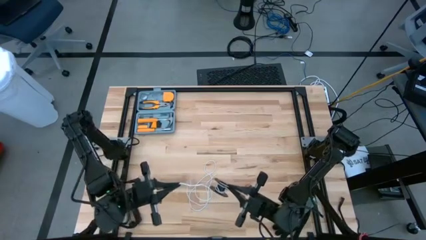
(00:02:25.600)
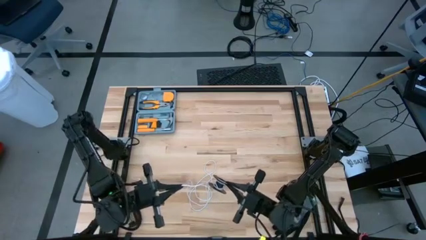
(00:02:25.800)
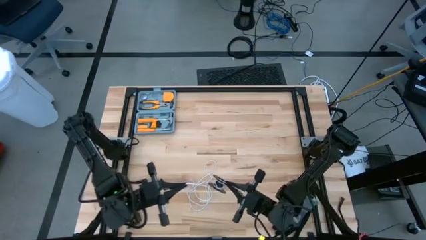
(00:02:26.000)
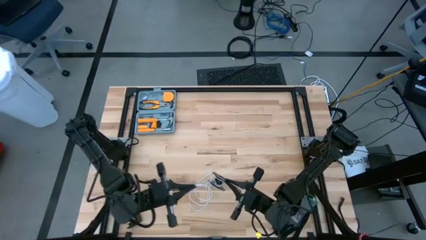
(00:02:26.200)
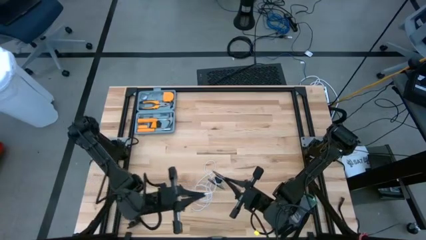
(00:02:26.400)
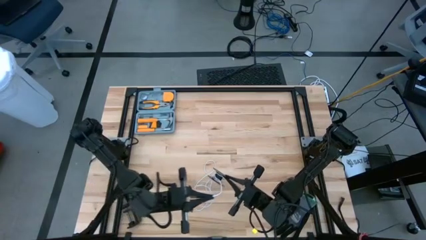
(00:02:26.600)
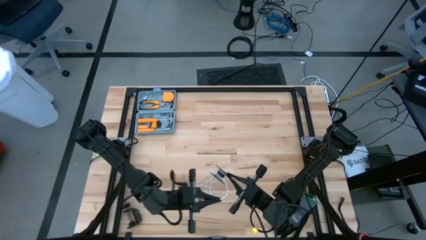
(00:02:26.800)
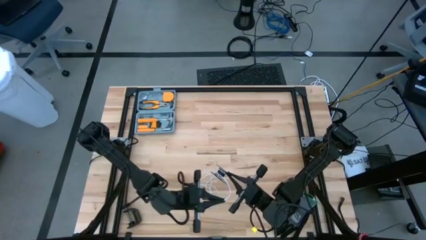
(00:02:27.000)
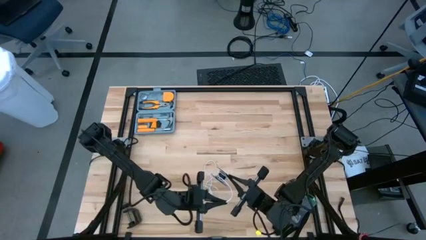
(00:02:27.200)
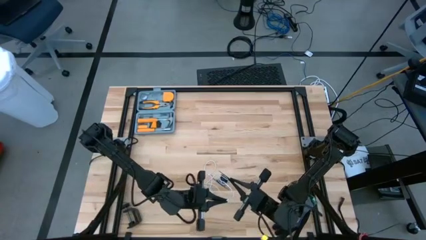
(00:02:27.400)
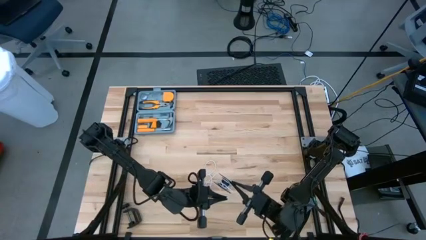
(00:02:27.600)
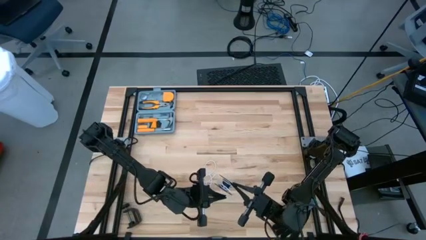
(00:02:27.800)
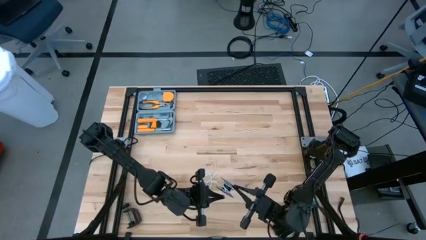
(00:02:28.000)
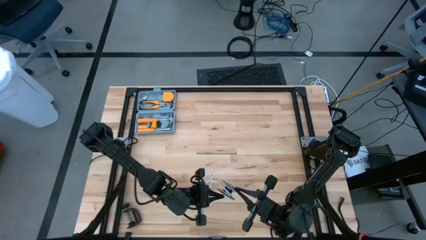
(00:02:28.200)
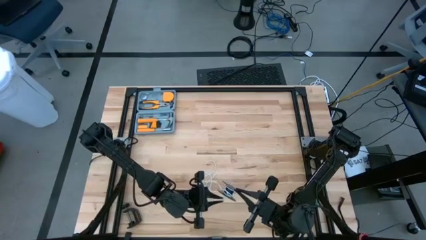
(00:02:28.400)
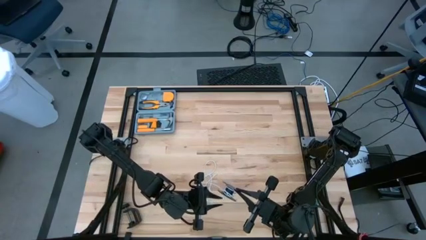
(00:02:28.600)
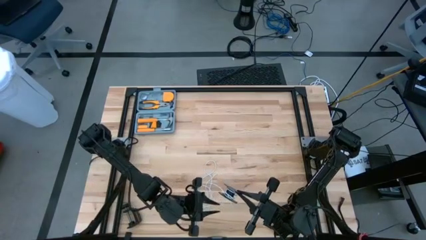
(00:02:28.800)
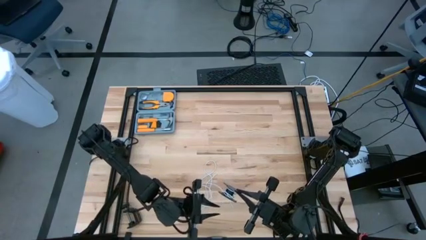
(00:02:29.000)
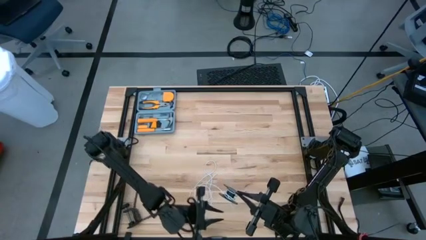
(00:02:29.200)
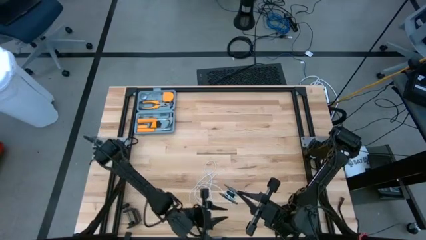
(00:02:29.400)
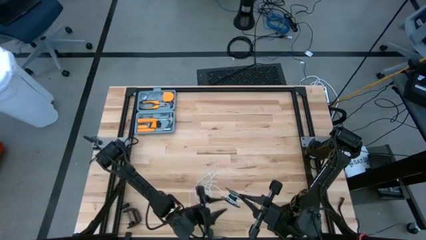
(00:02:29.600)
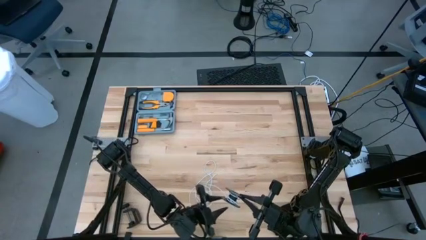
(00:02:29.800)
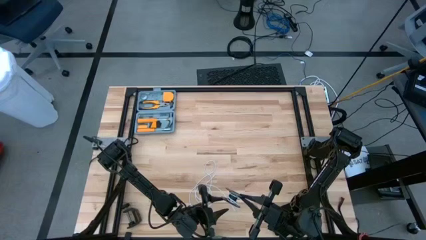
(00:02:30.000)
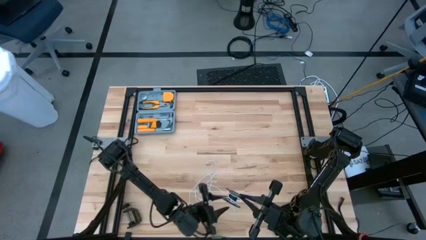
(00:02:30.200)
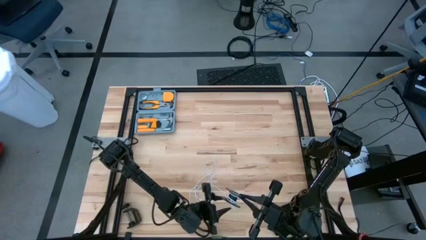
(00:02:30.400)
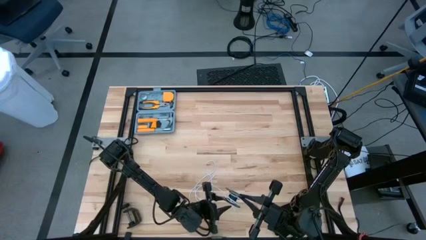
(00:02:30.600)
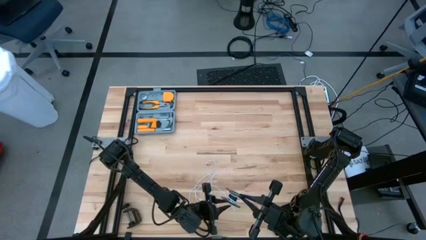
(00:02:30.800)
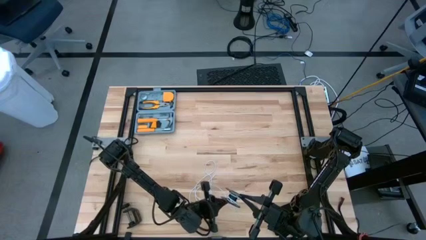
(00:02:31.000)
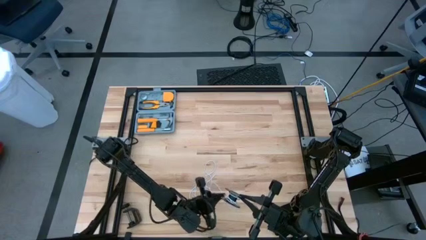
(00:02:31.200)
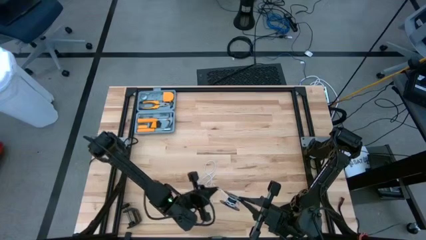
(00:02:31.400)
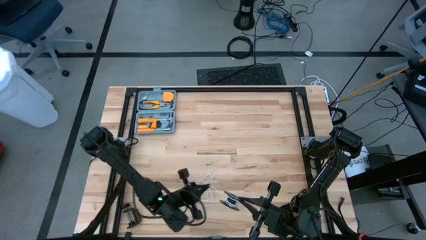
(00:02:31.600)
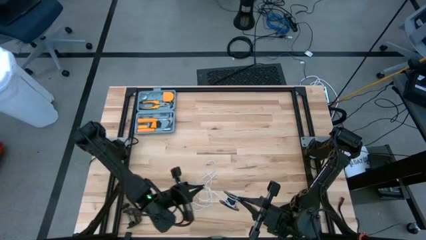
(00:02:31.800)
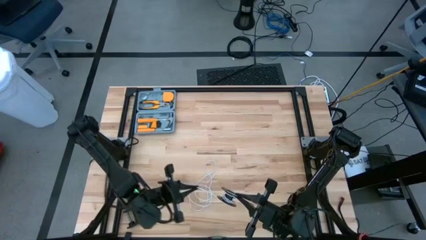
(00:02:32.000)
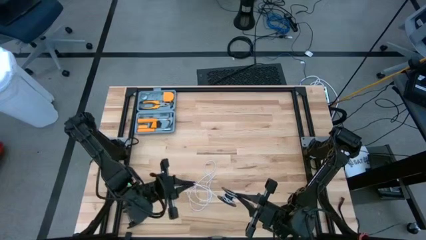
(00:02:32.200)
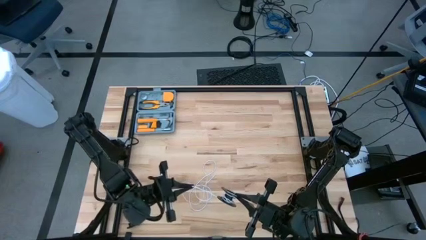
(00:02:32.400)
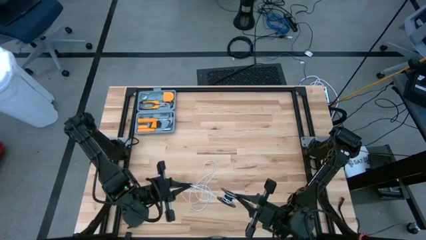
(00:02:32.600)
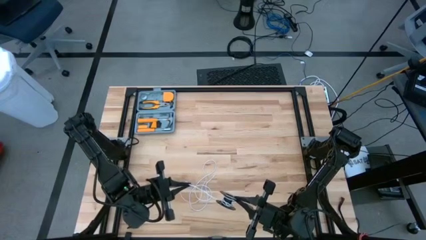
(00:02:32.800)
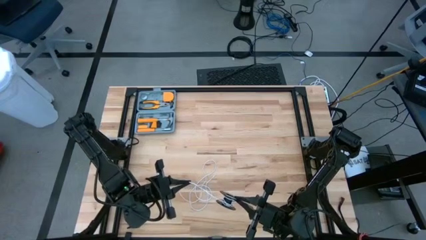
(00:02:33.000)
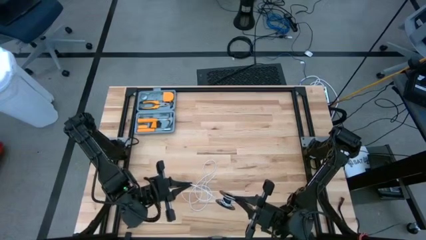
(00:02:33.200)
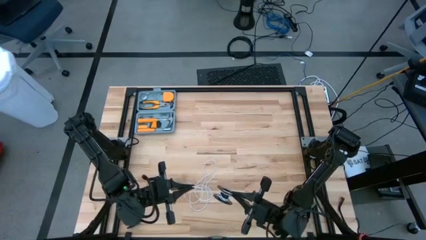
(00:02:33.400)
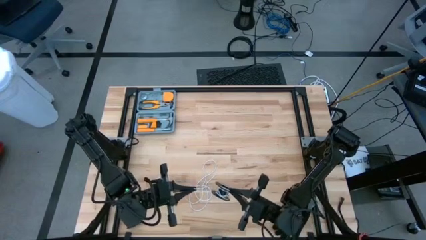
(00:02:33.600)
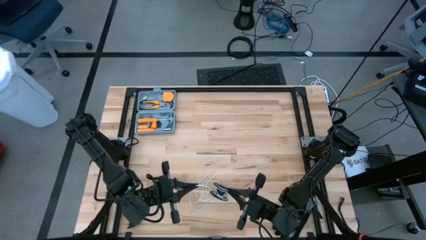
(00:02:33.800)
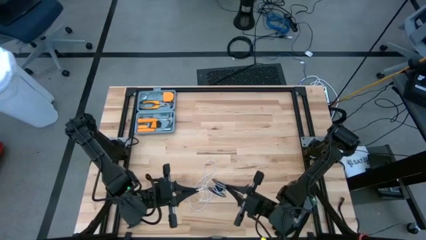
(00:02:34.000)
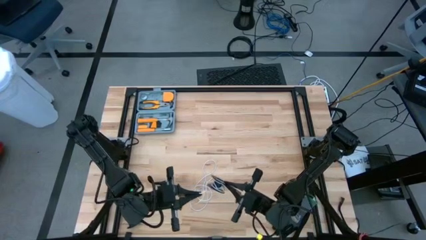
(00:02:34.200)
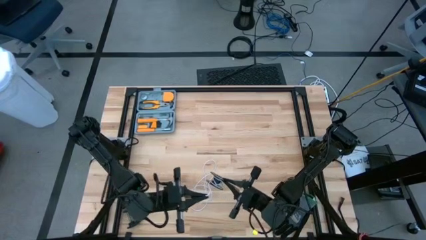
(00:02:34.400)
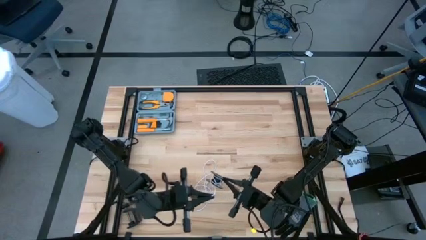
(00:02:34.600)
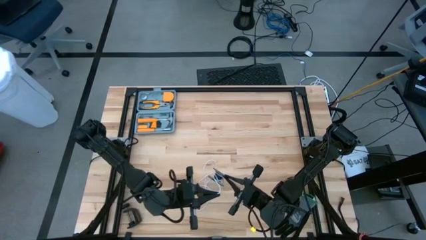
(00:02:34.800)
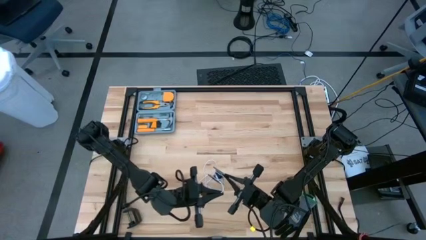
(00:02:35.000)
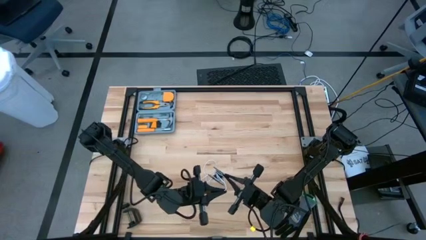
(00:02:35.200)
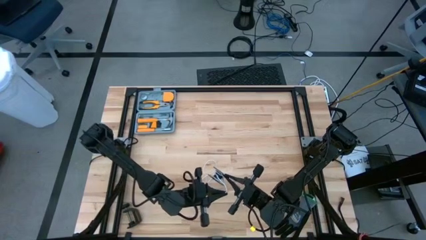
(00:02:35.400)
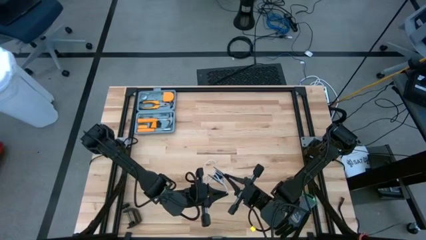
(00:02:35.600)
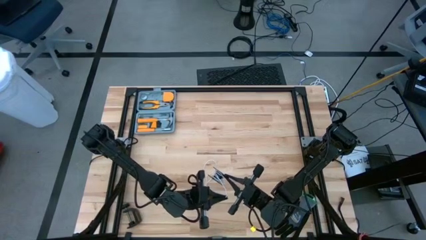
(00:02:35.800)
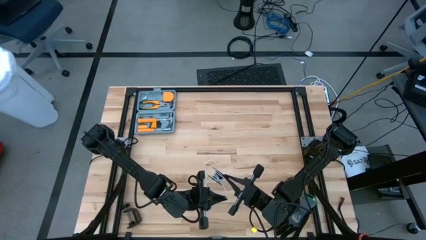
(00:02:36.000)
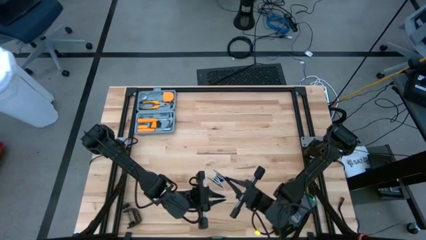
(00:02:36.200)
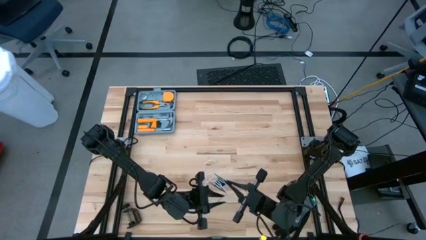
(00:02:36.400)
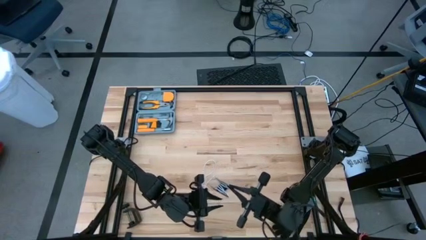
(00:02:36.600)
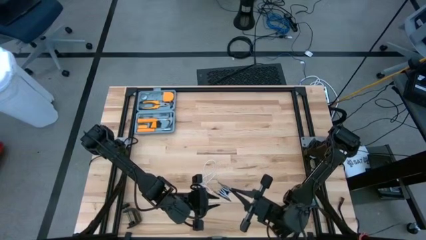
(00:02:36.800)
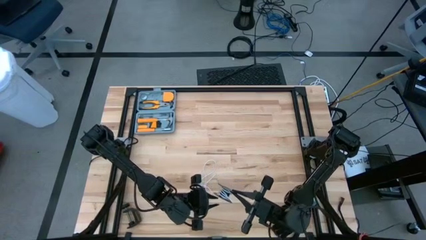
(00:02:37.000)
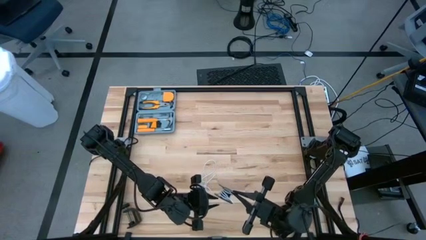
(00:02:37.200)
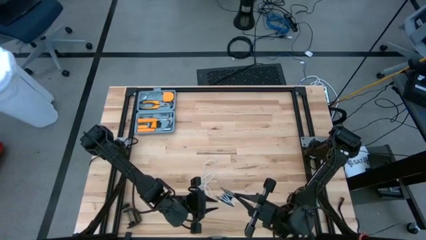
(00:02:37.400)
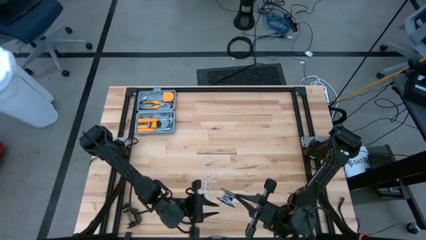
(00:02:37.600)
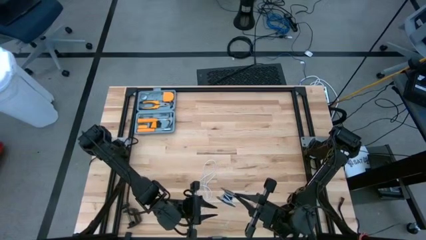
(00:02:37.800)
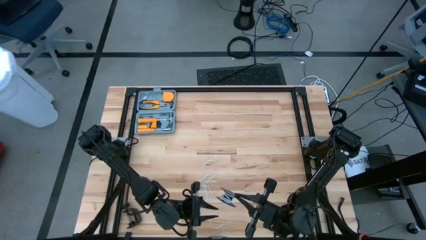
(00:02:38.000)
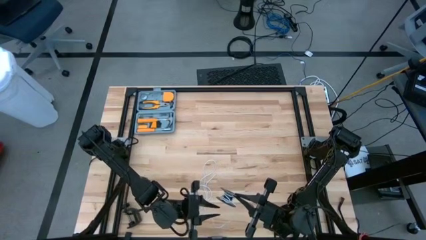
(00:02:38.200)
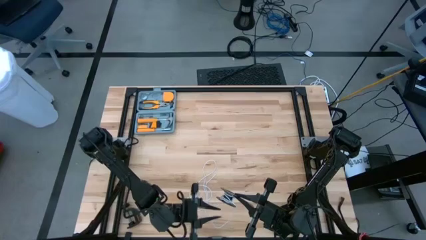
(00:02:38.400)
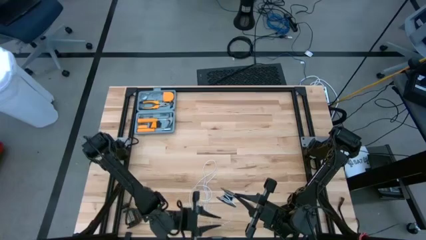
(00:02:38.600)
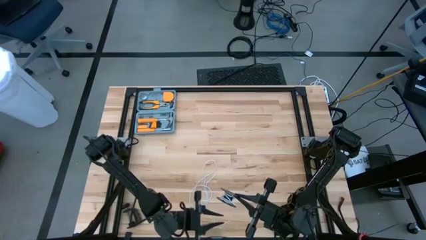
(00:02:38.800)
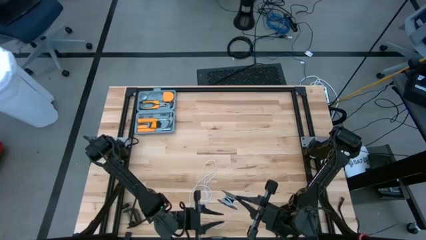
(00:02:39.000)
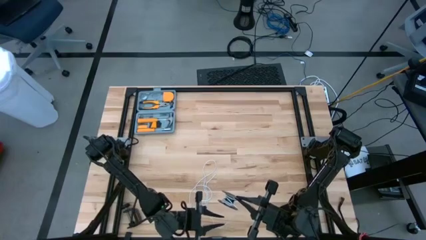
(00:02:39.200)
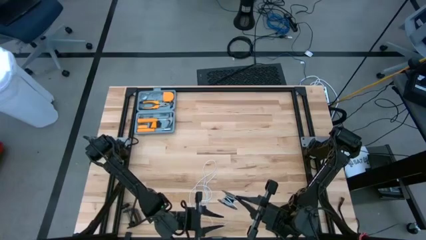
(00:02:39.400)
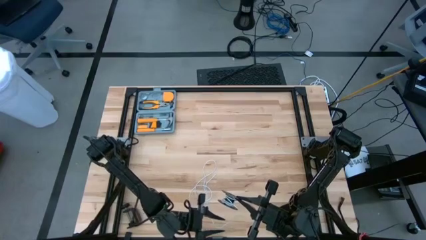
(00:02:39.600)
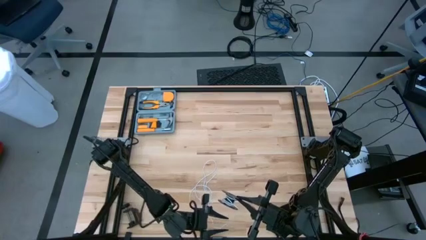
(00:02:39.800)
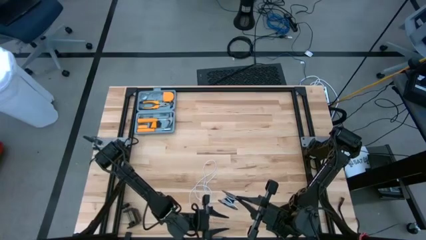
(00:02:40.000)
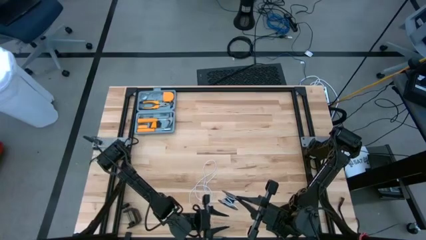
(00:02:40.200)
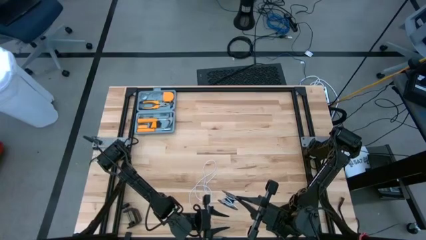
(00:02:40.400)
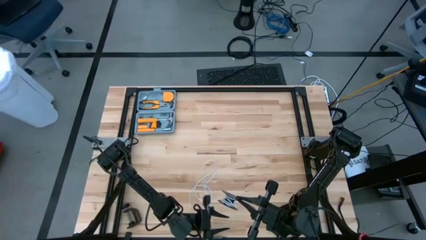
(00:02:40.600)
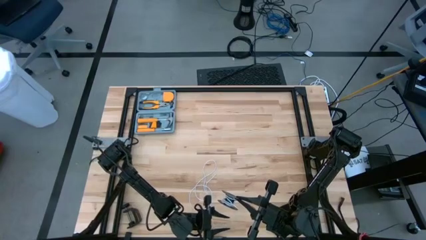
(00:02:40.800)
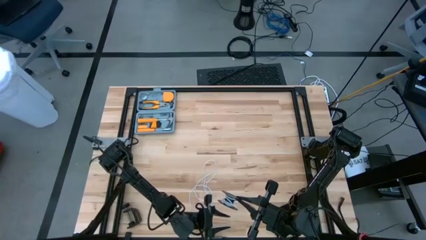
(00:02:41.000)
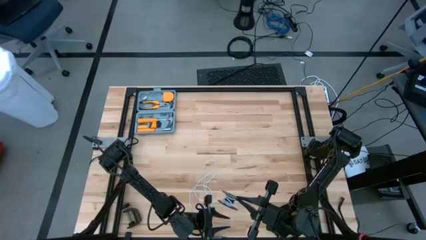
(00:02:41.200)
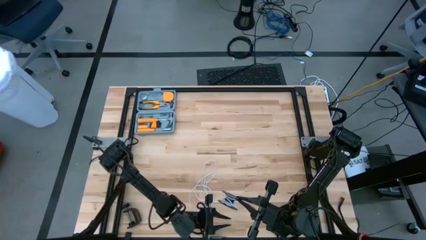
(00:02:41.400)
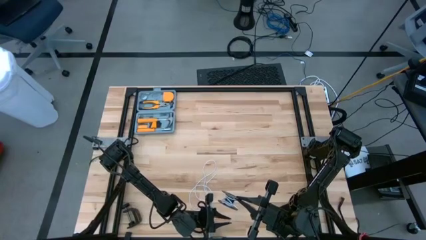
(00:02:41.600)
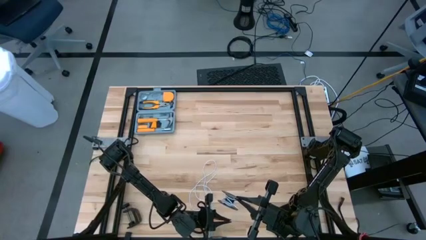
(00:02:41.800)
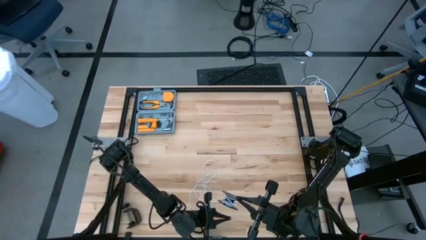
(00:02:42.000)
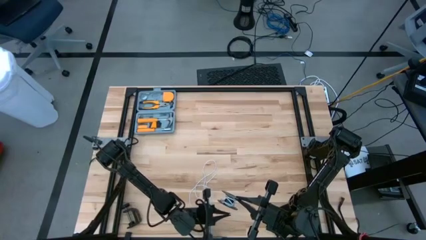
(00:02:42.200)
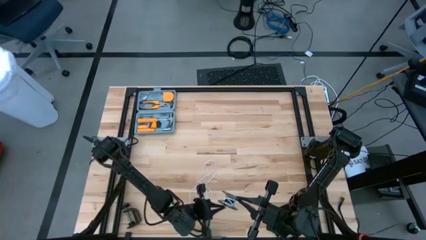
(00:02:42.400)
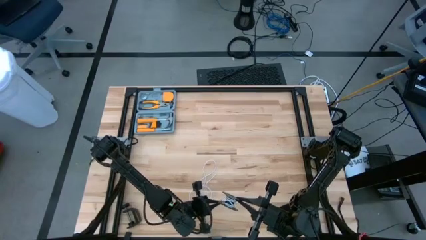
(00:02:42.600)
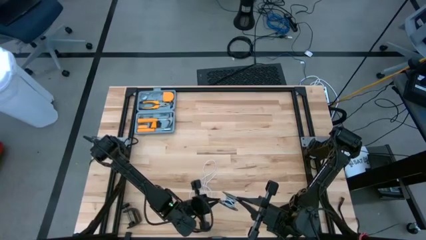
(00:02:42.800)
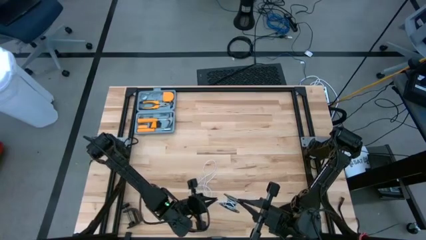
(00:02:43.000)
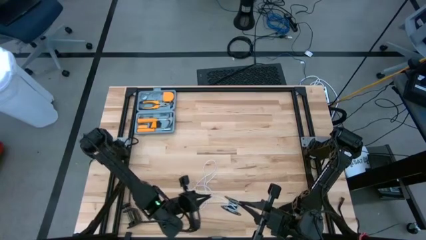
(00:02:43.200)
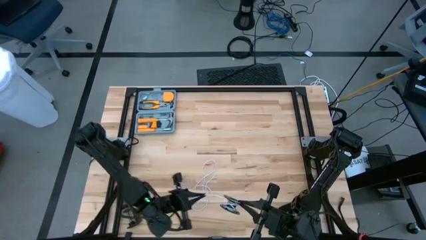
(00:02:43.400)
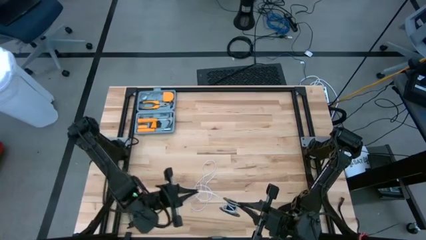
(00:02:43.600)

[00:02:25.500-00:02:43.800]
Task: Coil cords
Coil the white wire on the spool
